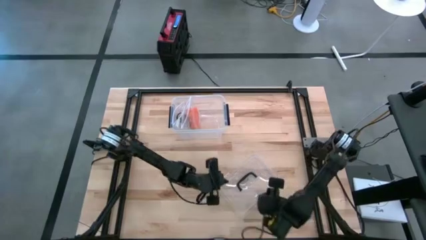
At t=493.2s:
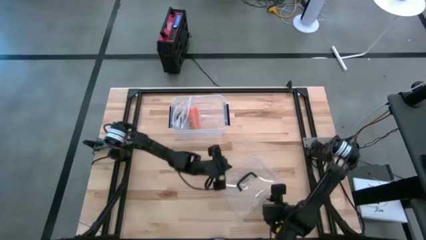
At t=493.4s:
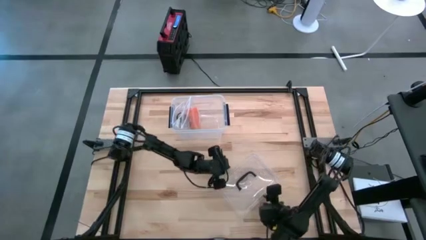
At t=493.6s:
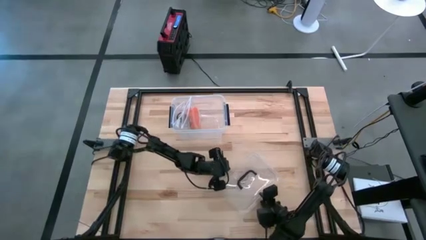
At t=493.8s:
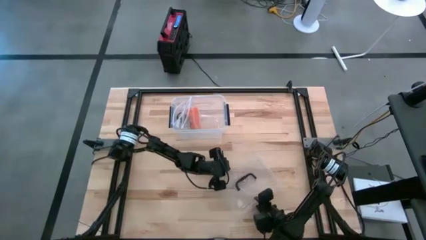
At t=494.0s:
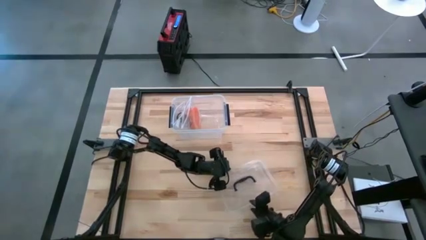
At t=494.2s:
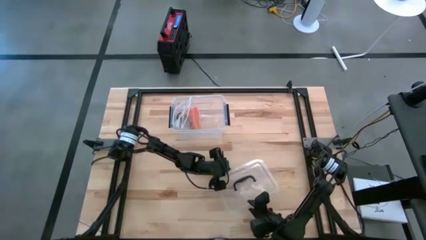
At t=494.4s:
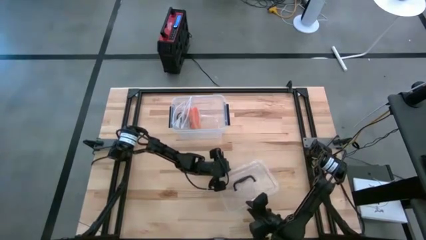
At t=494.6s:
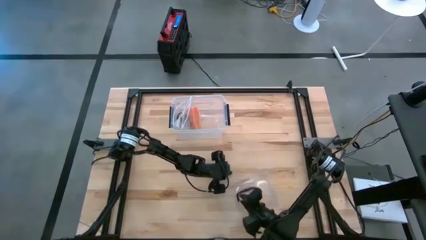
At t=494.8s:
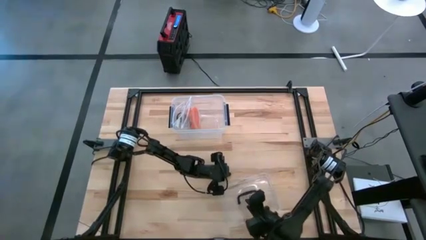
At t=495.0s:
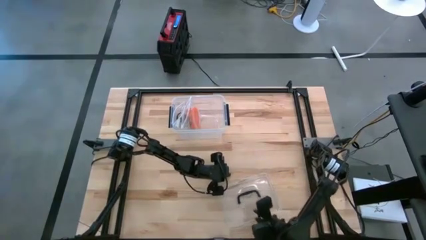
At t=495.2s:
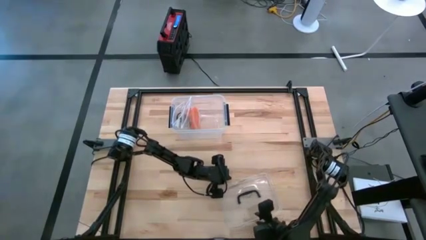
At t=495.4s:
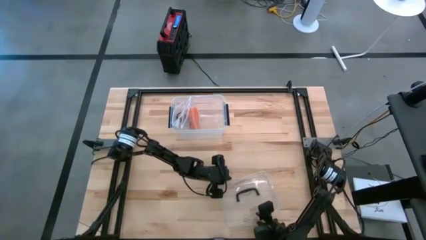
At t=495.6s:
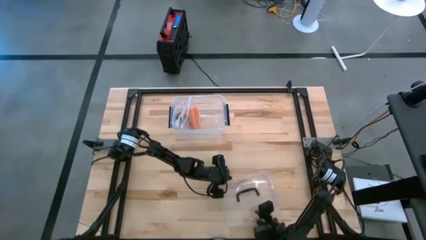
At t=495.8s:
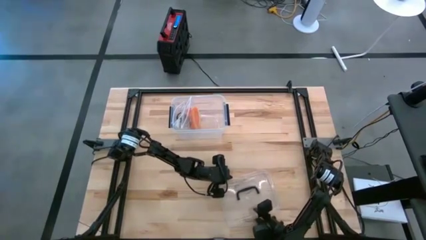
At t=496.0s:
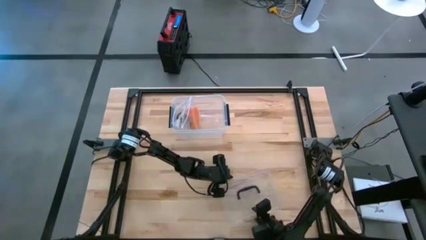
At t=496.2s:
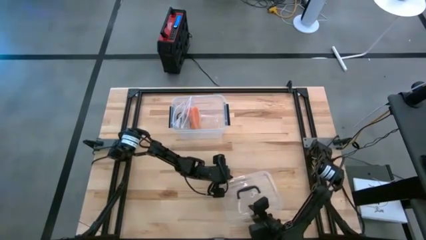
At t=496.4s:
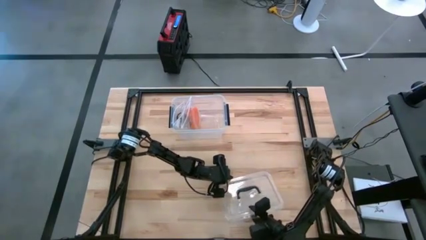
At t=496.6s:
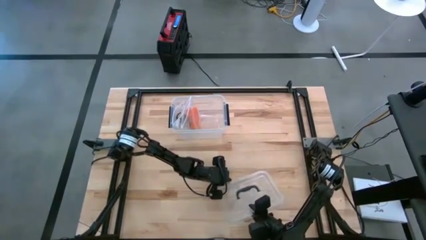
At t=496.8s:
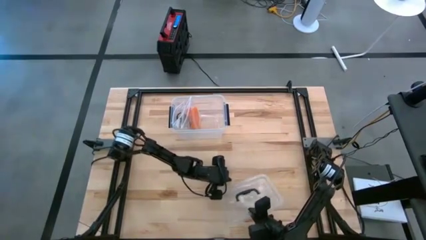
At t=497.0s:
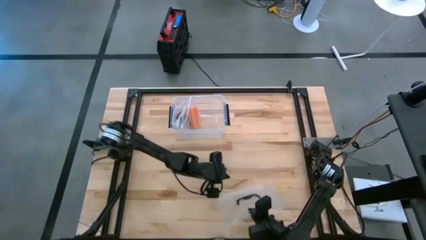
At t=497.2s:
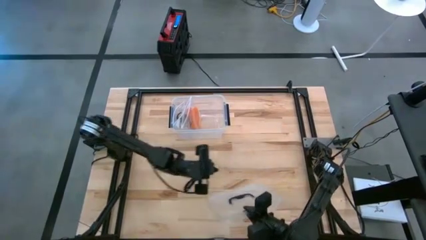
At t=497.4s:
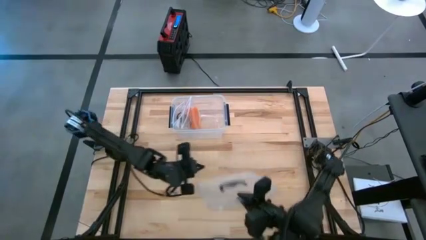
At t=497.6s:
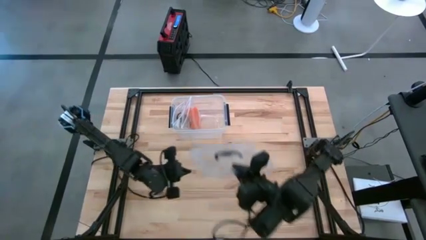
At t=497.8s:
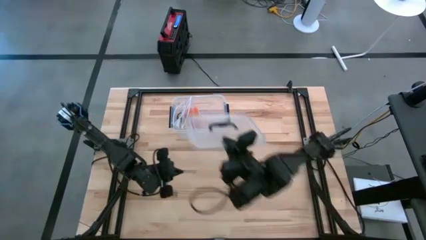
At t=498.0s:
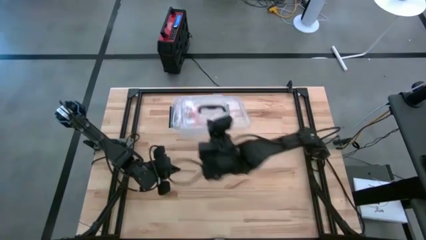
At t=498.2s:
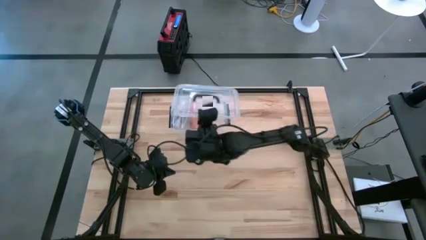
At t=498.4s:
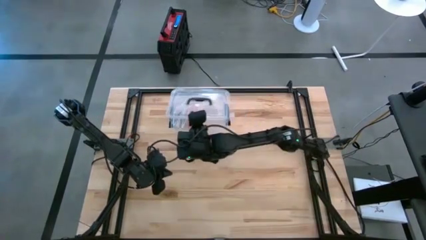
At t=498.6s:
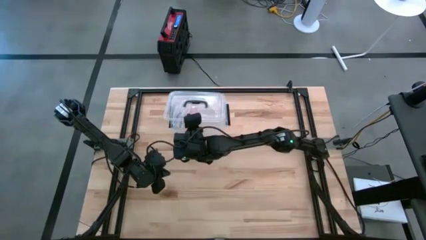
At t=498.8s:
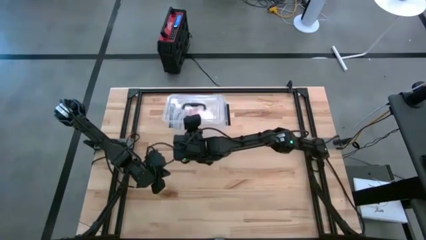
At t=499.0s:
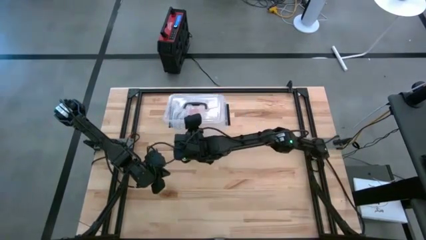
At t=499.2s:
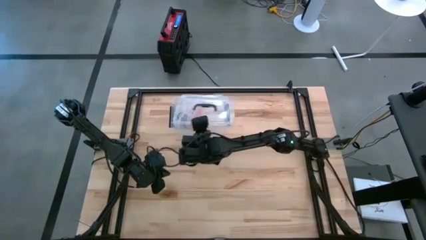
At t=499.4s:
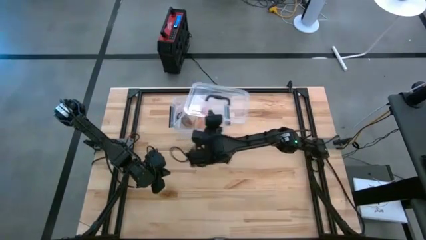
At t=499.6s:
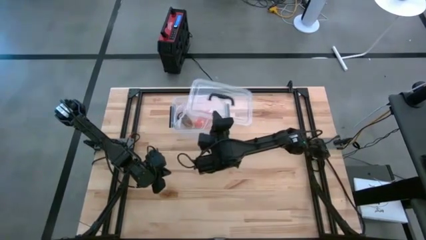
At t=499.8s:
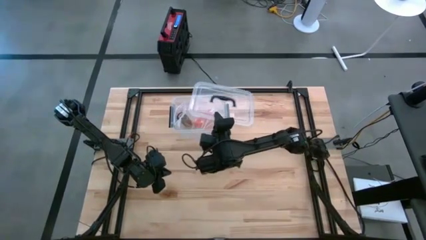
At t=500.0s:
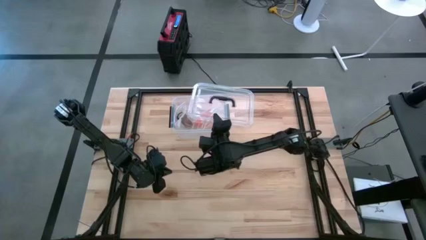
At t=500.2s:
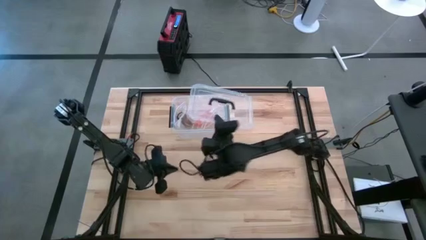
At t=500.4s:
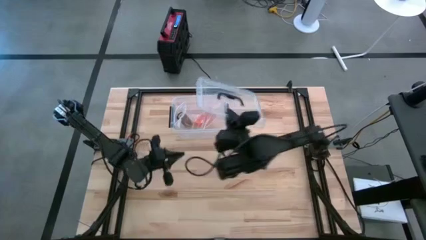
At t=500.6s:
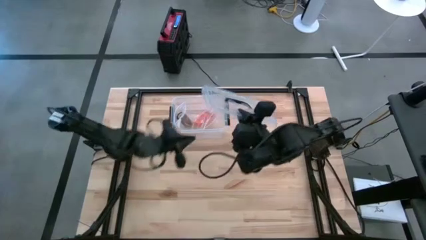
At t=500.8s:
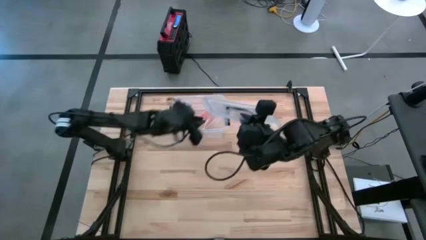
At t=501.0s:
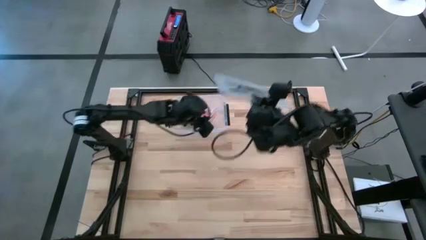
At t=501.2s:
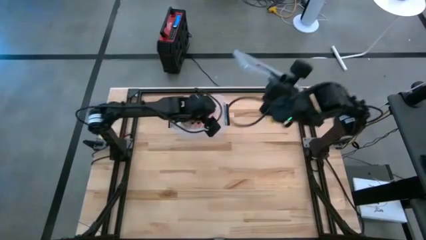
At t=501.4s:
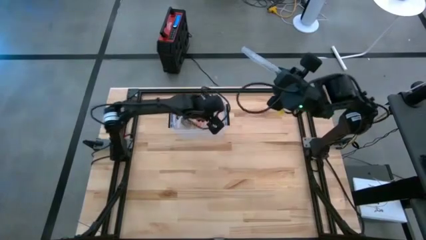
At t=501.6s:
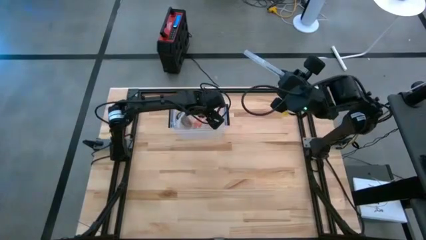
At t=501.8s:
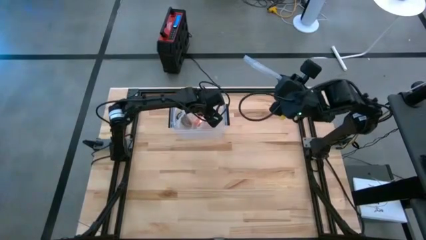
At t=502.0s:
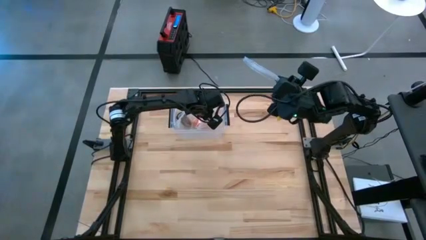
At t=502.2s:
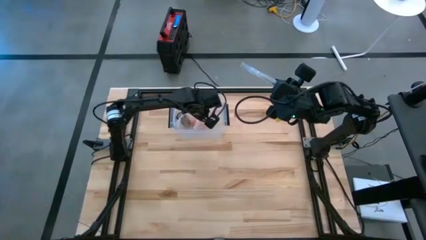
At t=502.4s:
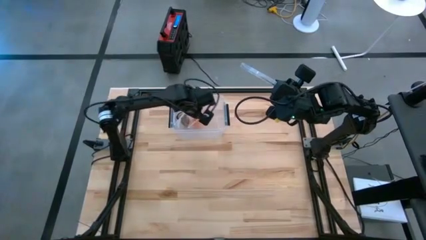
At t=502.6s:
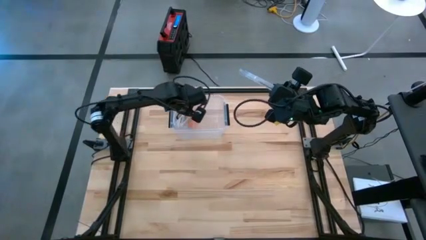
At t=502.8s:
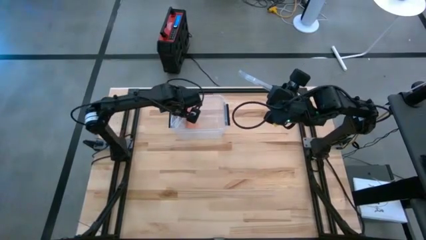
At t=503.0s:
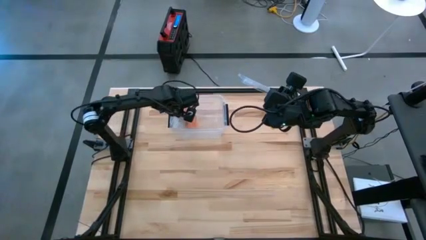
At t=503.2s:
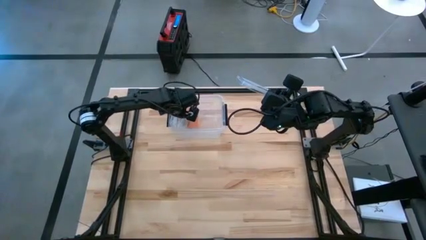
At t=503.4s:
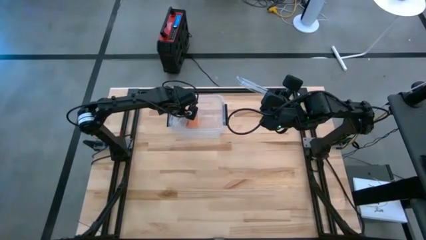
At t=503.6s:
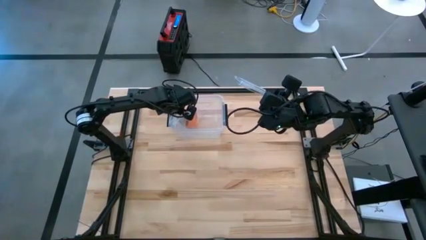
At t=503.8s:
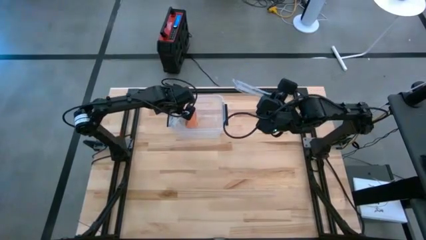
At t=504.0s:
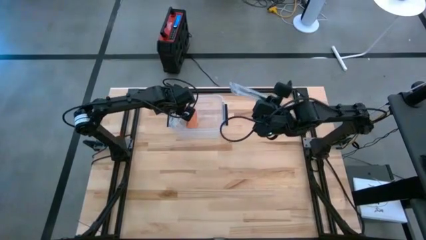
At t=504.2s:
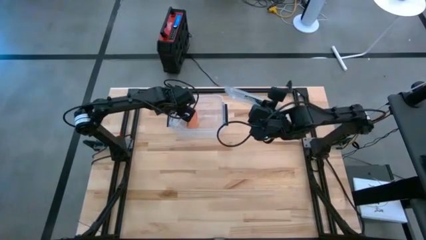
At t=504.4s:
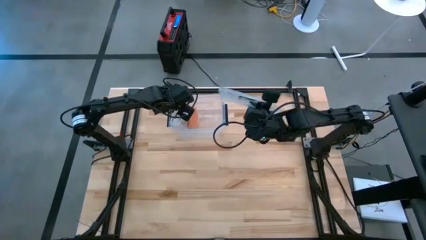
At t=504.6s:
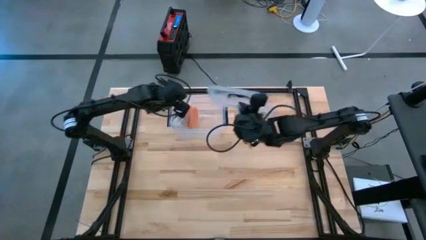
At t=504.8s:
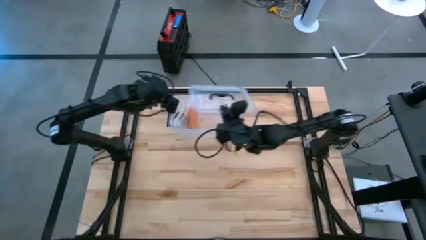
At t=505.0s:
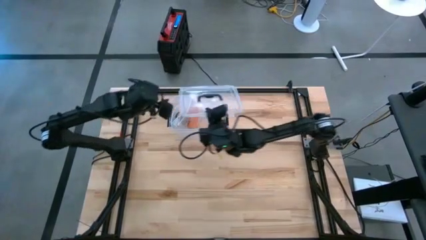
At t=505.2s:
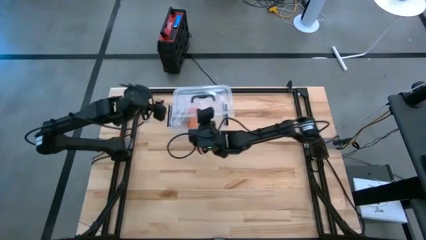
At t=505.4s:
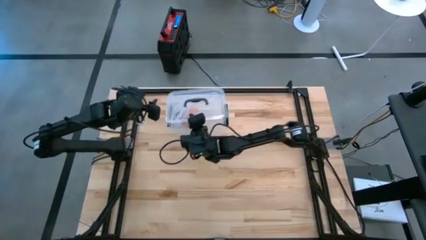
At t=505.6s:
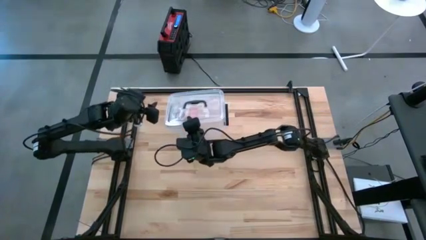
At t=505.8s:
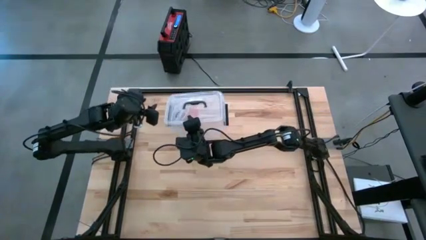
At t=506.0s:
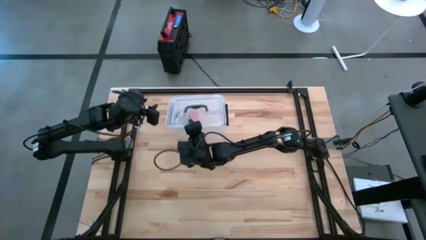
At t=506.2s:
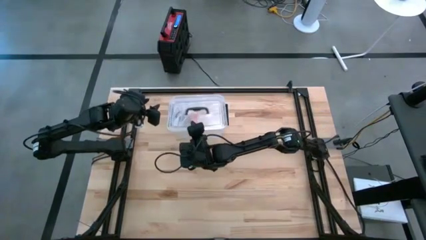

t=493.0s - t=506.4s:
Task: Roll bandage
Close the transparent bin

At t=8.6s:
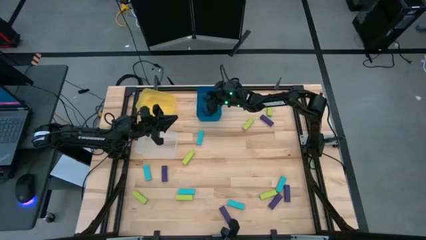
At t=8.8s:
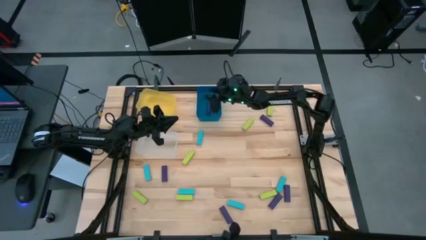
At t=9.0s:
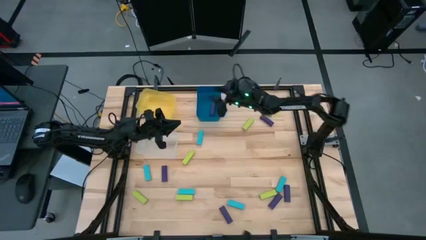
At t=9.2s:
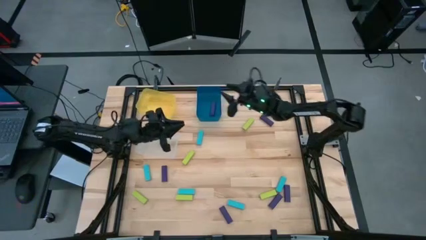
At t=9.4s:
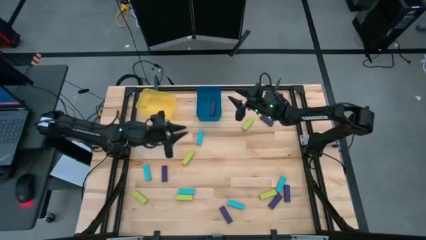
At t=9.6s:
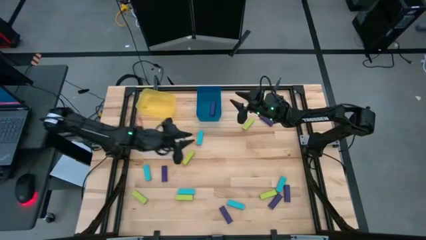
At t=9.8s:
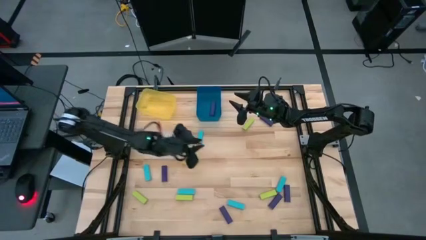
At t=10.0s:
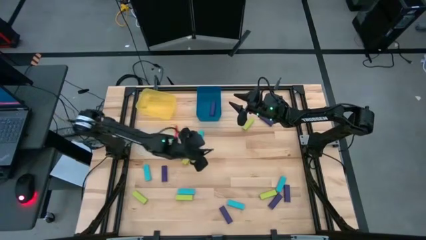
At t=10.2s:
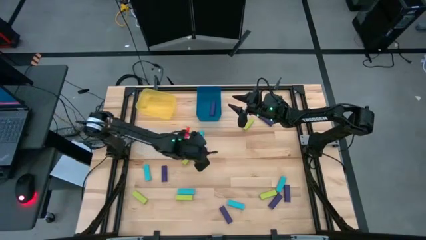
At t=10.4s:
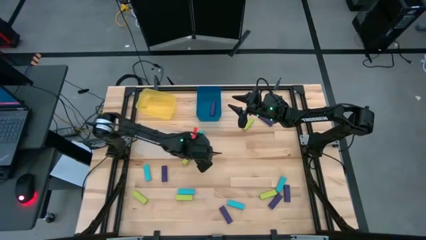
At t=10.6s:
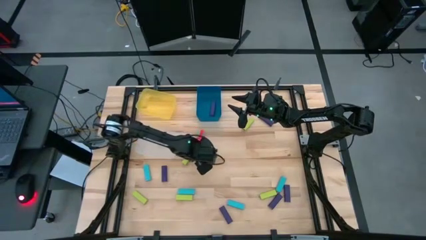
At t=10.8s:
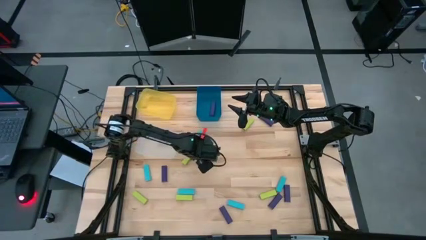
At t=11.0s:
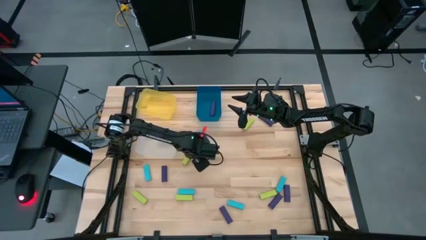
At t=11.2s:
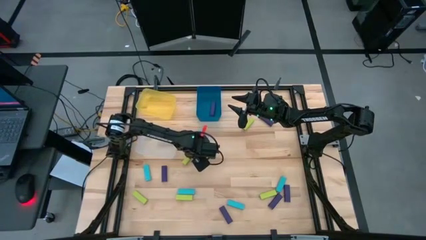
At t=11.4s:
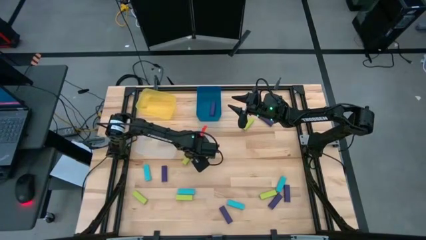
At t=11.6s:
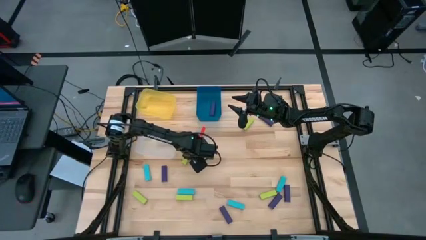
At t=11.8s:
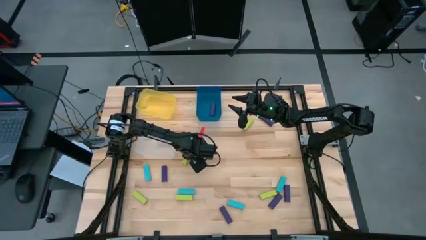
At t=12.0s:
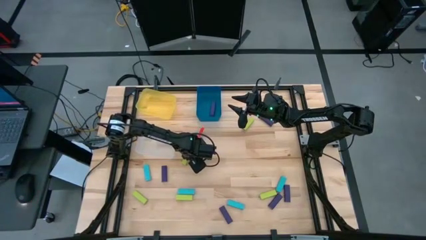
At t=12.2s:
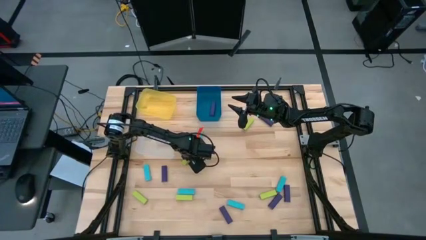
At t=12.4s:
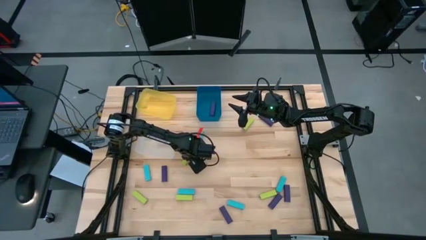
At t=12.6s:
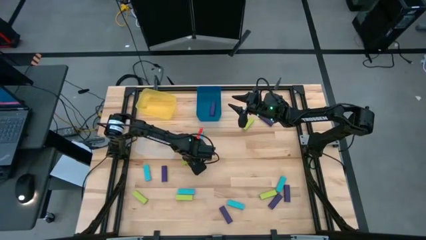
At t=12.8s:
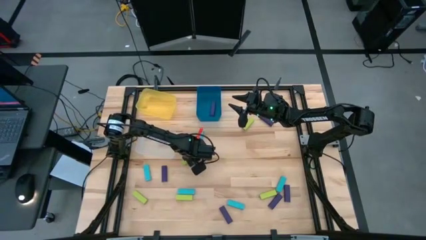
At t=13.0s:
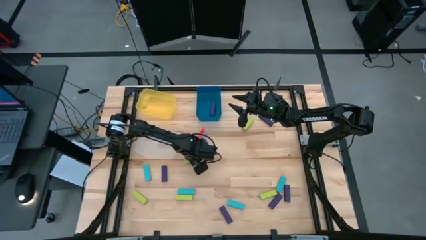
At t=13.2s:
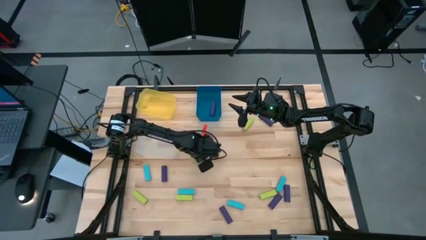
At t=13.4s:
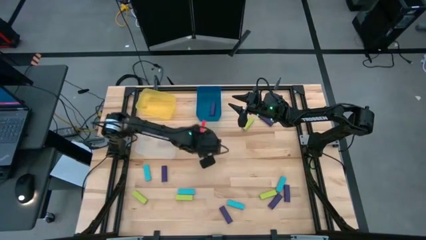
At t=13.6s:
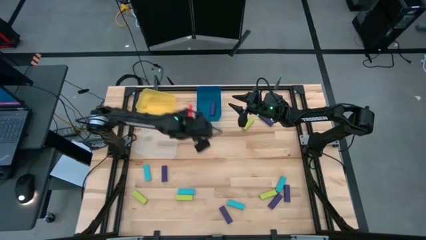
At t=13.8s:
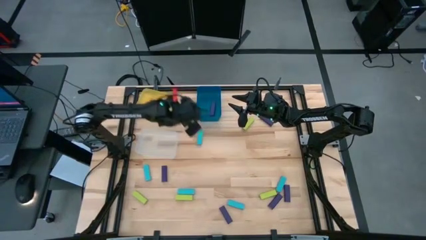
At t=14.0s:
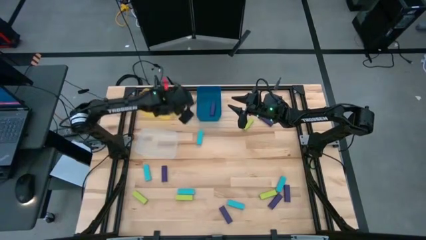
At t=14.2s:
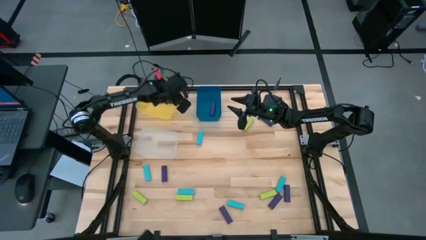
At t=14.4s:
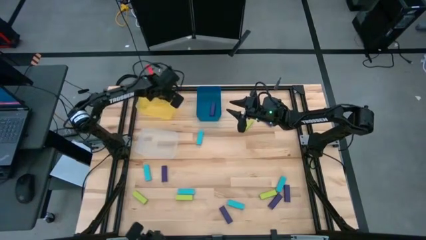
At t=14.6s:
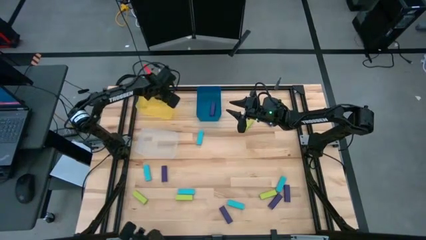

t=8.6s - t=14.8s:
Task: Sort blocks
Put the green block into the yellow bin
